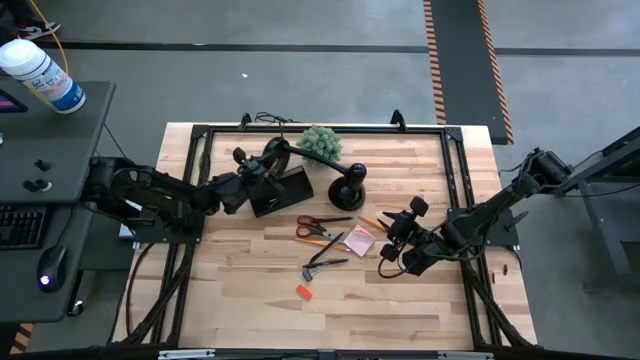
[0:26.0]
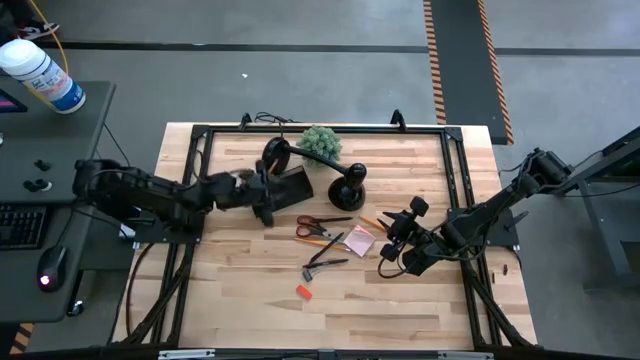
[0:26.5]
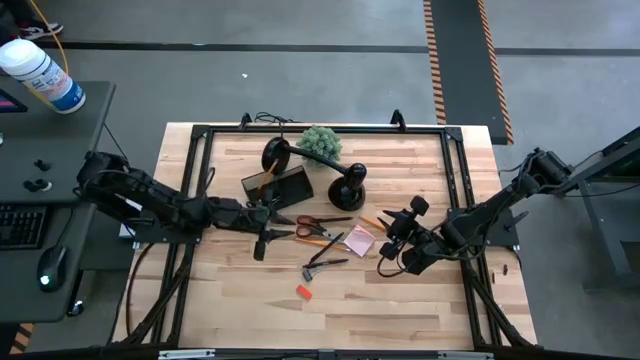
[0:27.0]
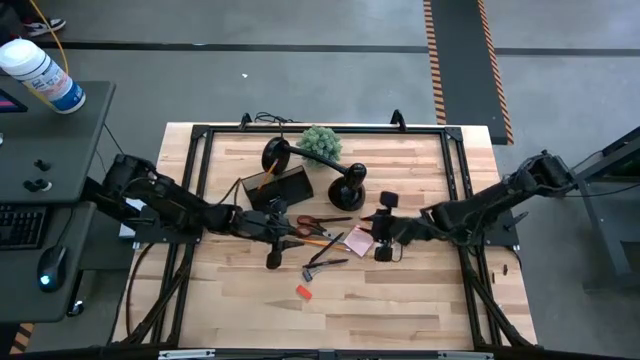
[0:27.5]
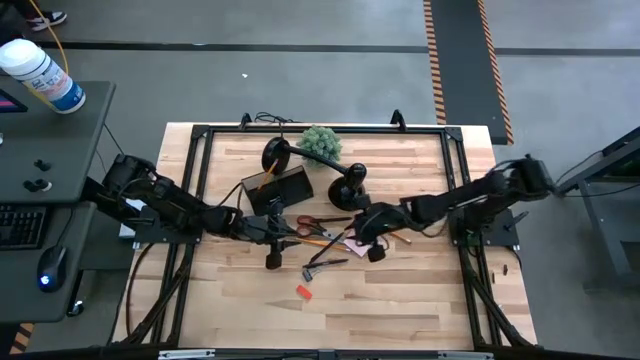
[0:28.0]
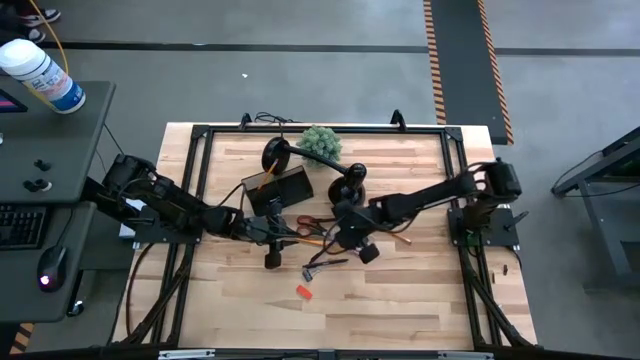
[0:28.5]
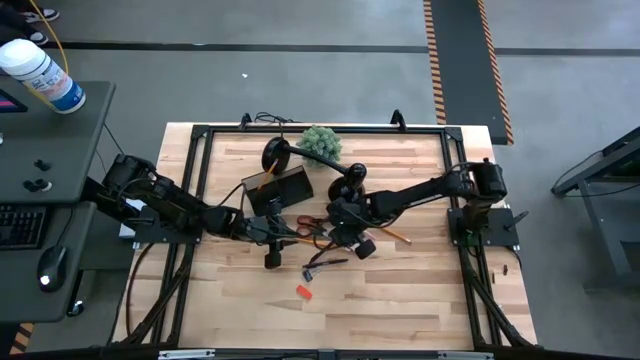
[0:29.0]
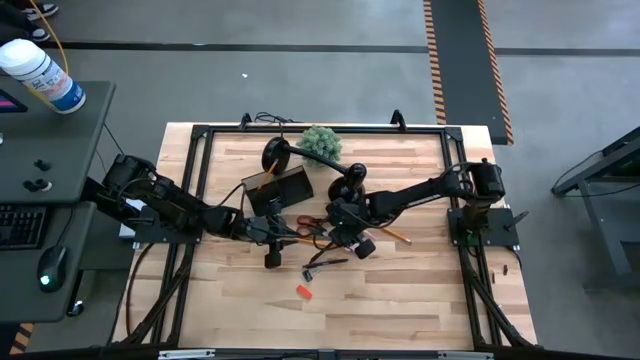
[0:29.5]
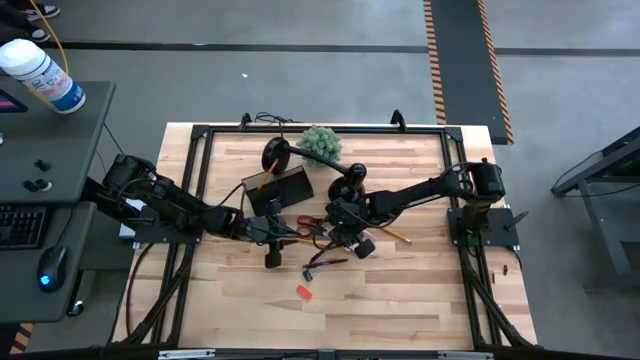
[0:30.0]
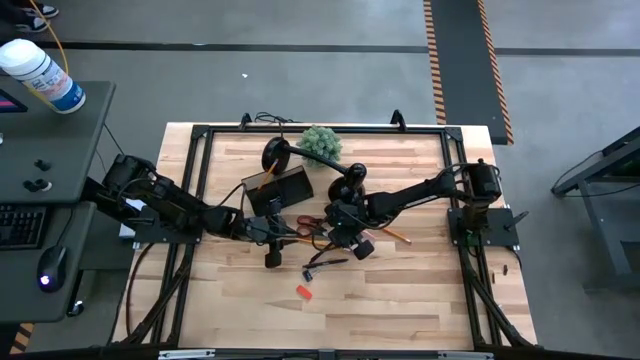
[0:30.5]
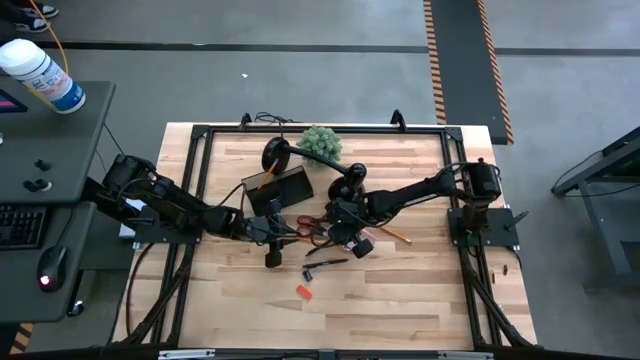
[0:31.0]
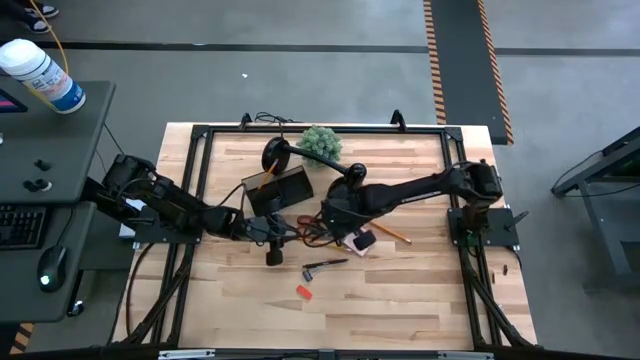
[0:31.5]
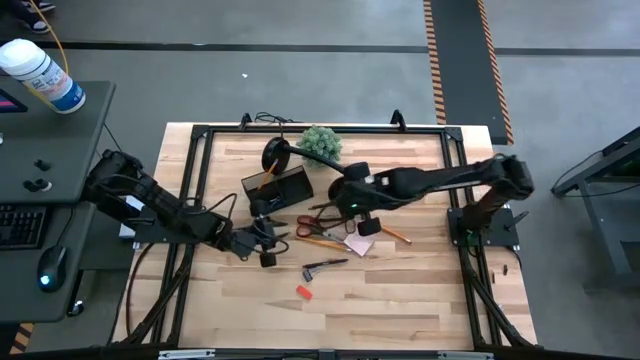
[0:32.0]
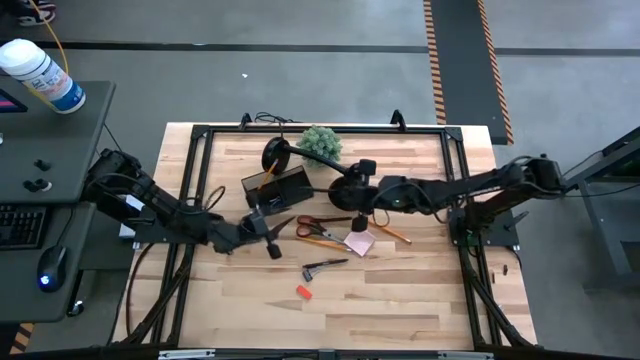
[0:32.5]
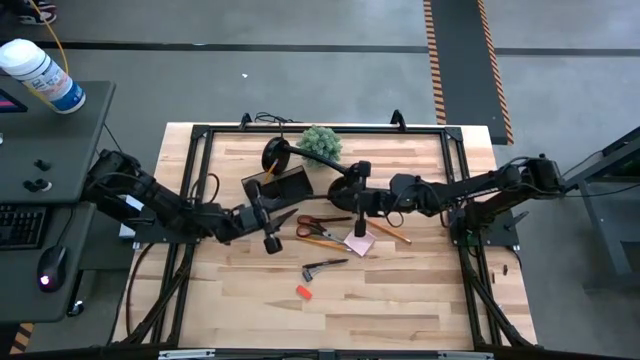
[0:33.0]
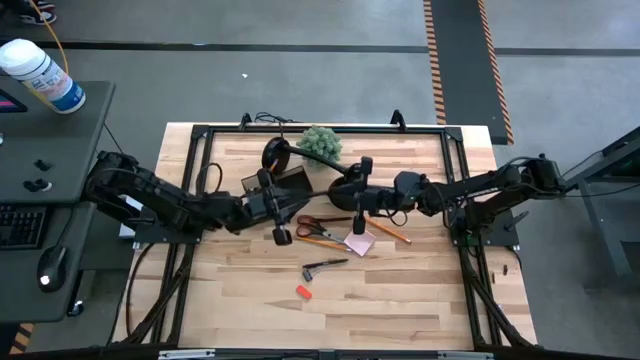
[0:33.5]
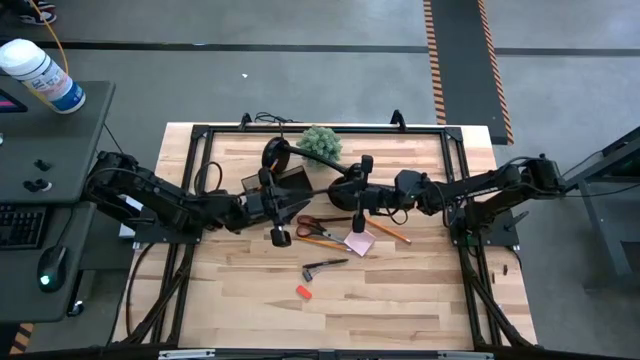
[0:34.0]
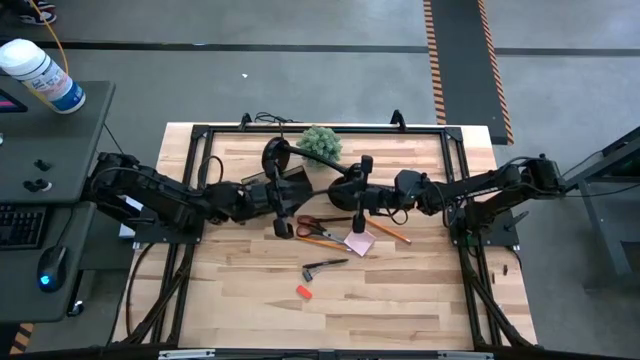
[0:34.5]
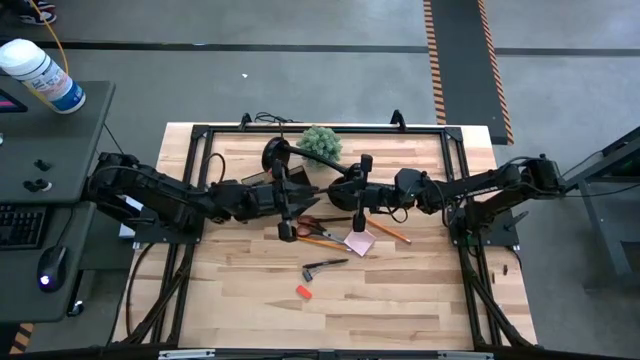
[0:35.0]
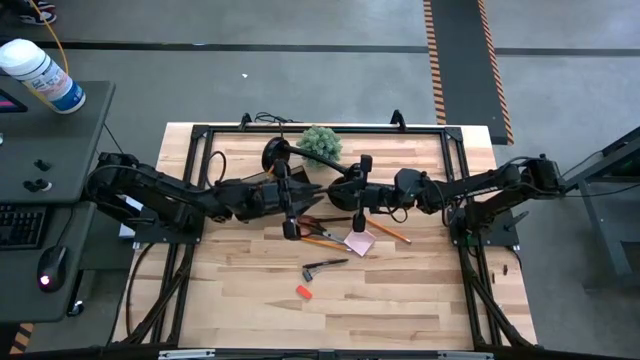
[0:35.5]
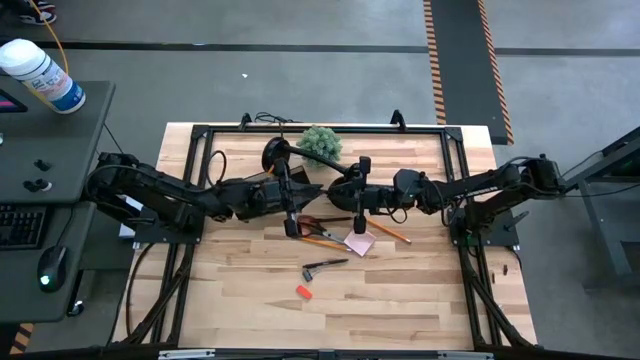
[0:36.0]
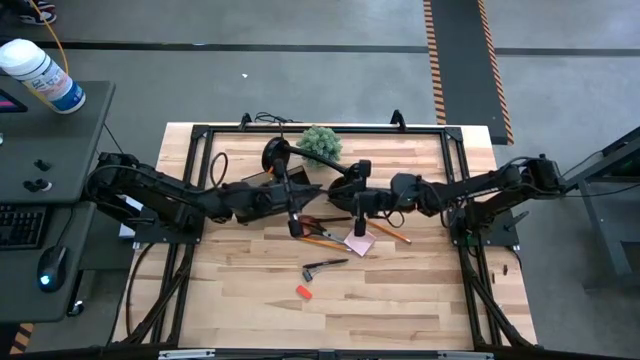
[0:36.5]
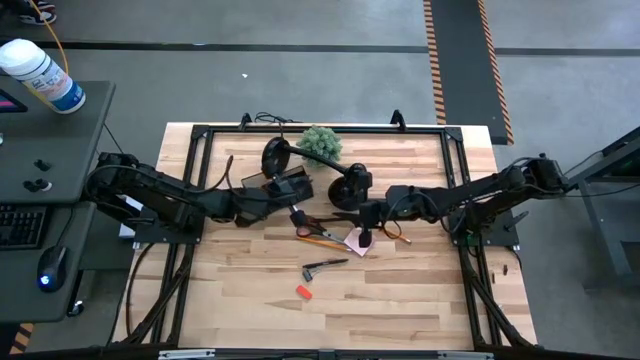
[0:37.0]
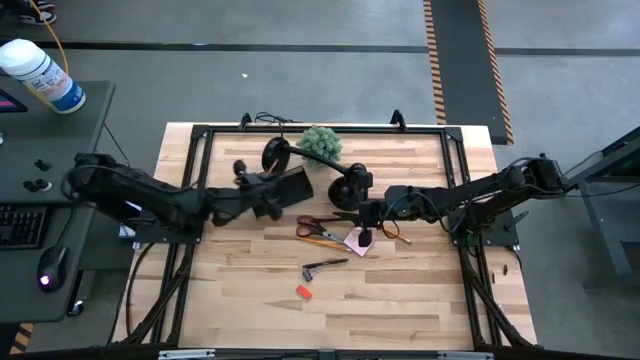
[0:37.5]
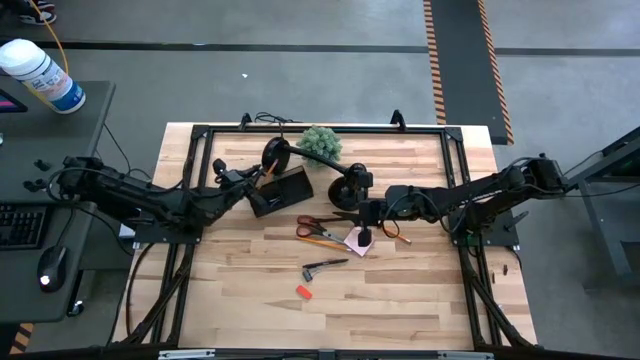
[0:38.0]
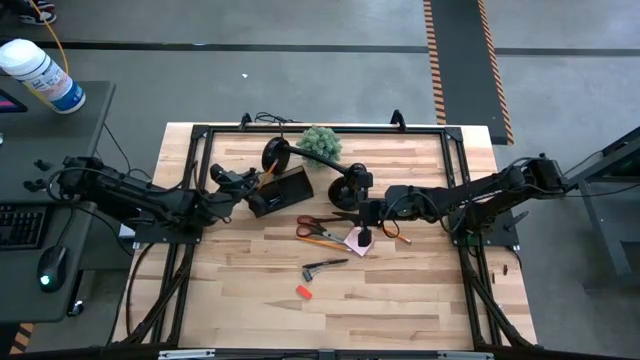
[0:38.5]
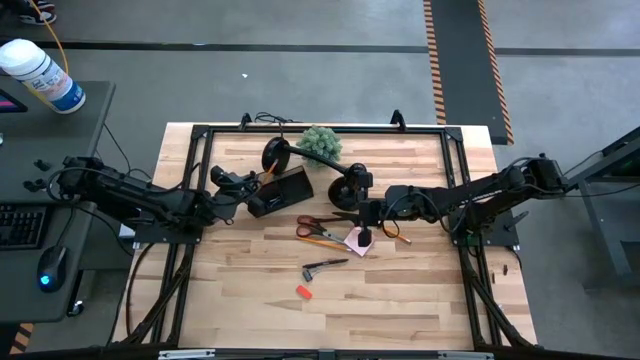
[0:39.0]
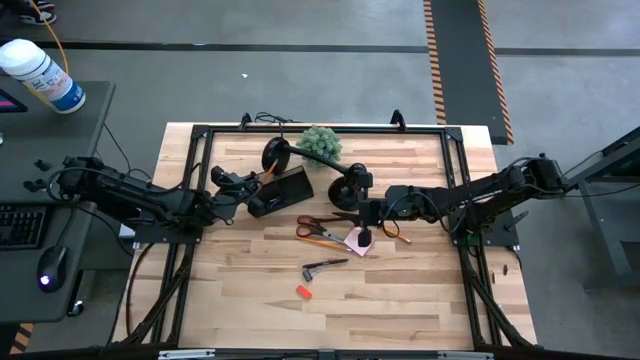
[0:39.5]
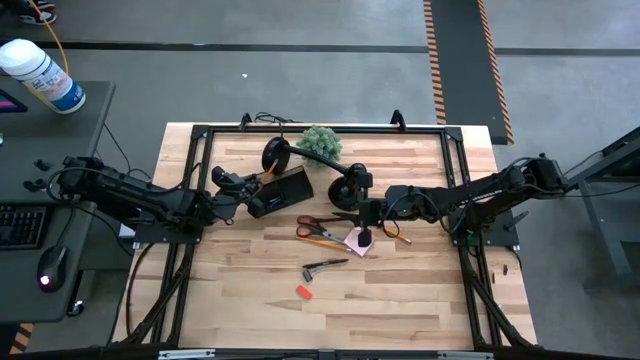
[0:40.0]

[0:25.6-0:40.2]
Task: Pick and place office supplies into organizer
Put the middle black pen into the black desk organizer

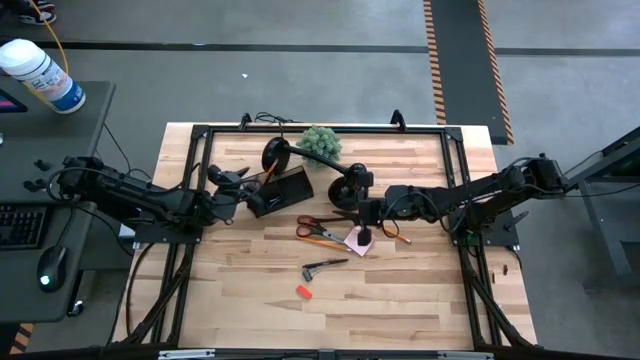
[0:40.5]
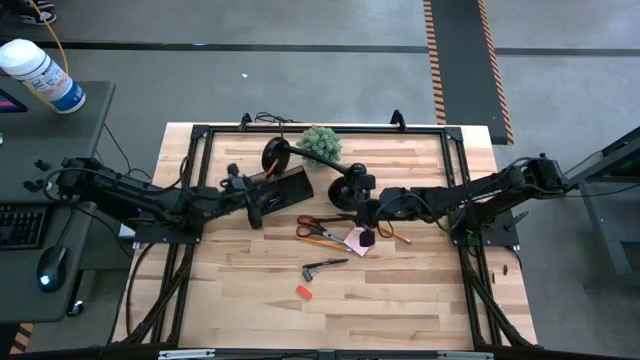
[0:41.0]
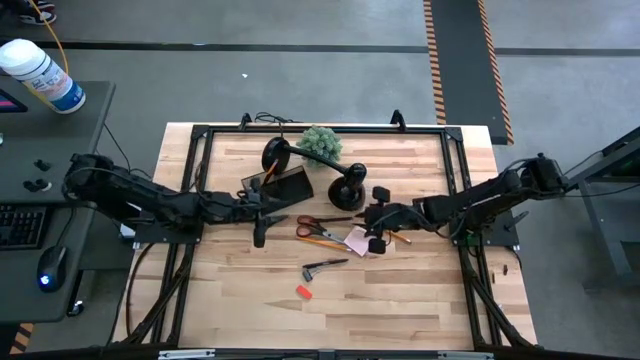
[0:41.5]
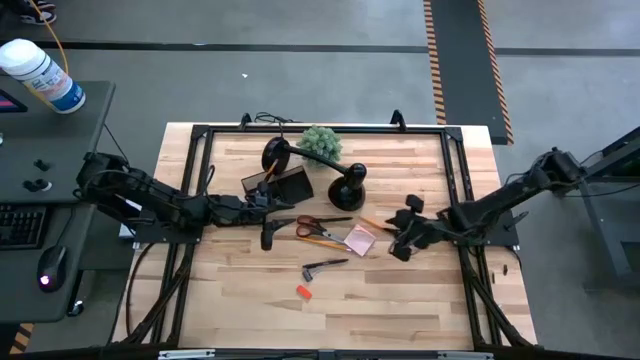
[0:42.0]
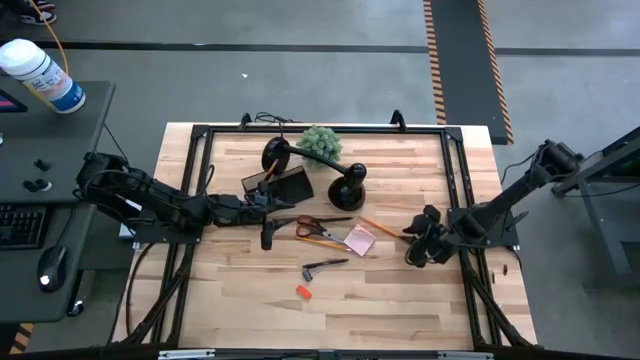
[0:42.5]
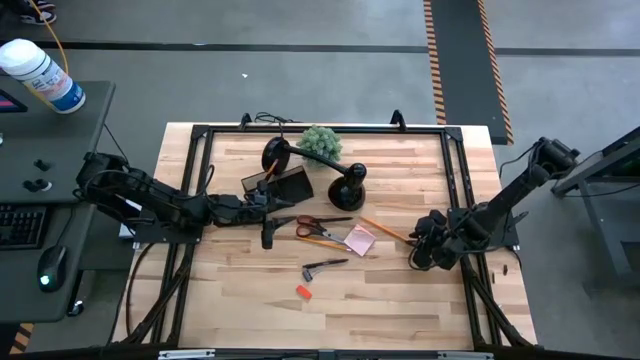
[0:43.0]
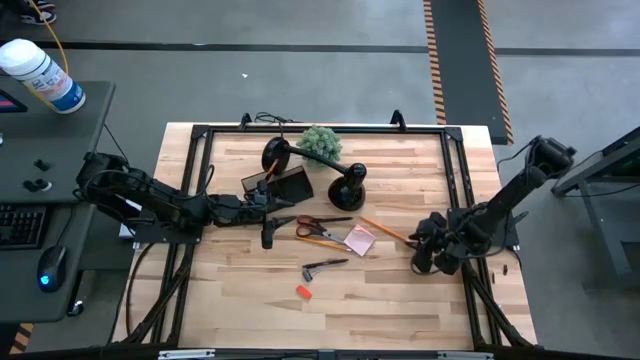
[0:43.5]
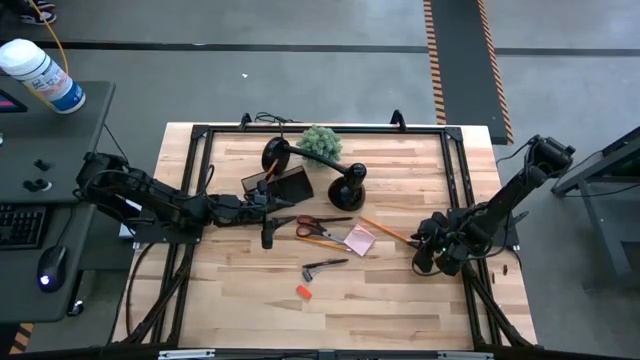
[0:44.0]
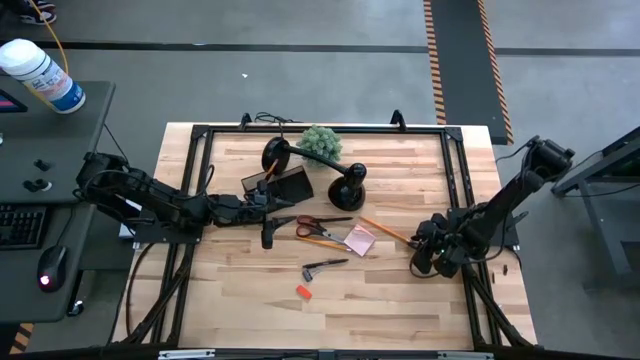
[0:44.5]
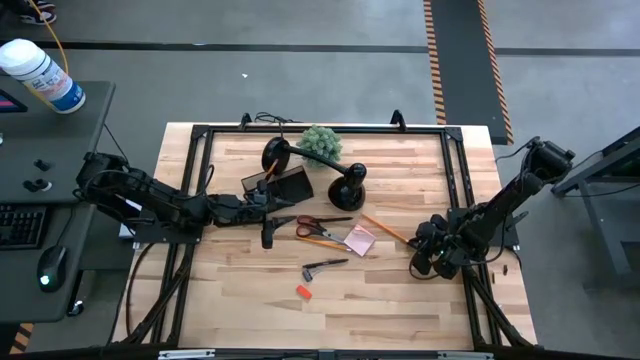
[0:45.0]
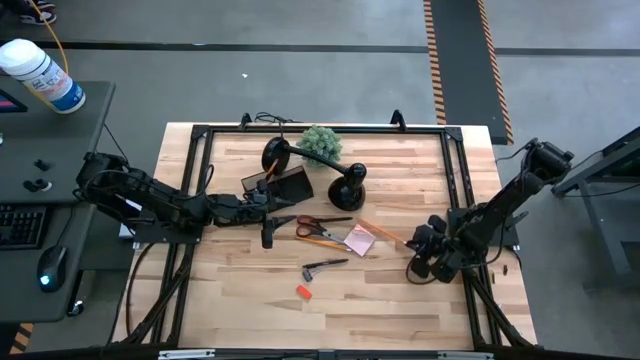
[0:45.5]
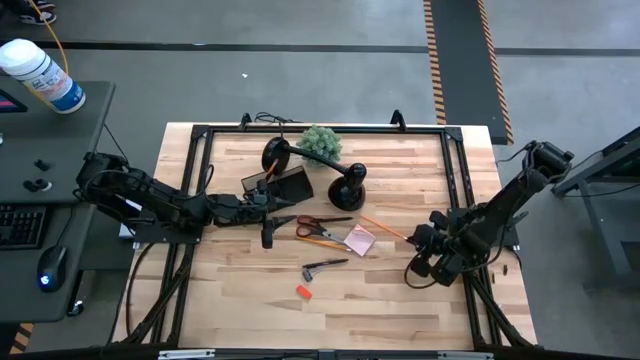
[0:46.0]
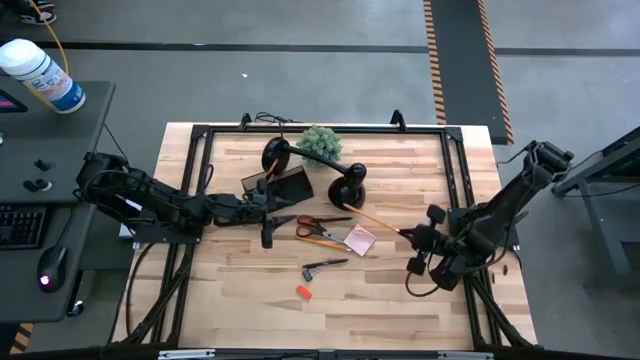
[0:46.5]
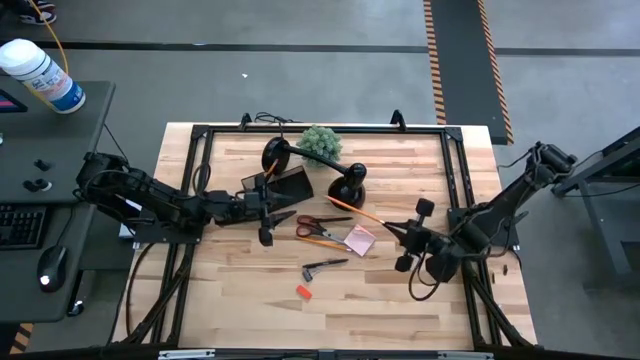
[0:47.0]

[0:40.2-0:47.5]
Put the right orange pencil into the black desk organizer

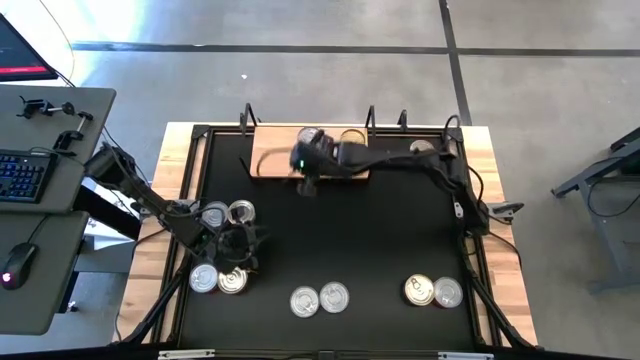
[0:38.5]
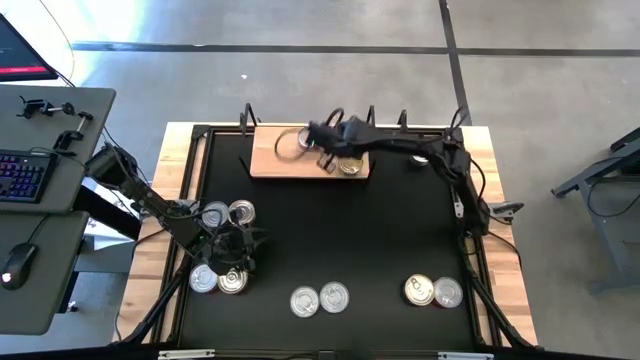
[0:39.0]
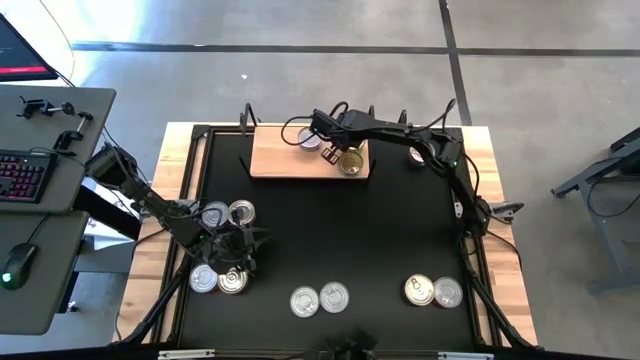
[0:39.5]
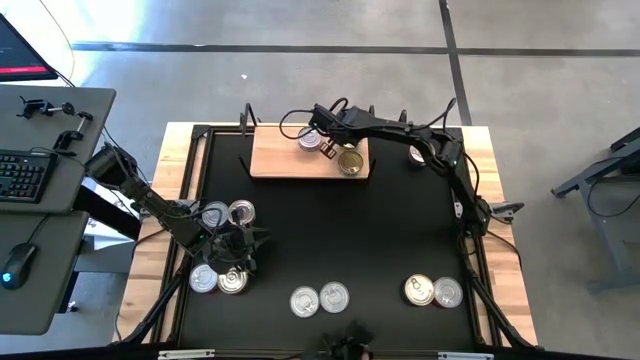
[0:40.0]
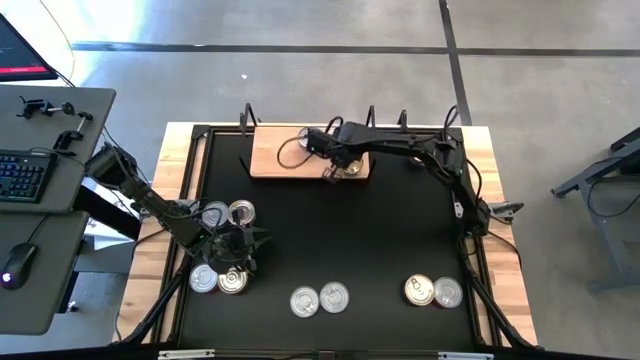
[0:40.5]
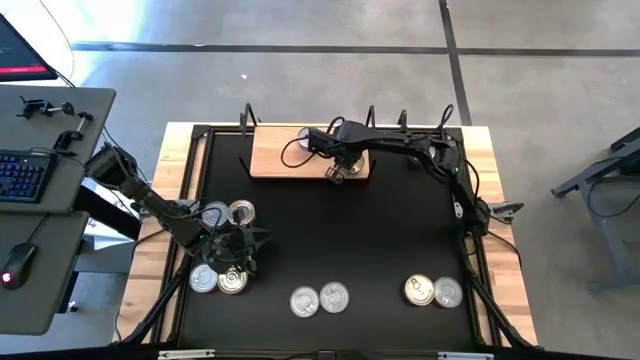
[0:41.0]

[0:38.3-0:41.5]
Task: Stack canned seafood by type on shelf
Adjust the green tuna cans on the shelf
